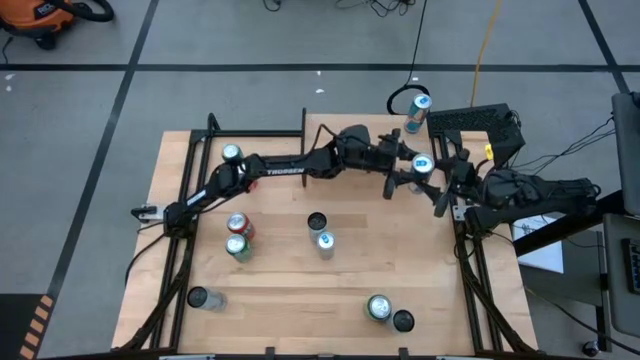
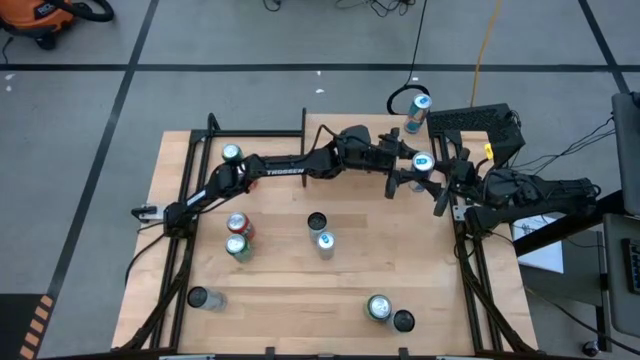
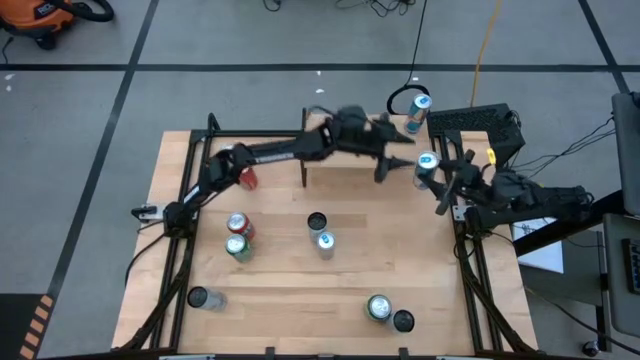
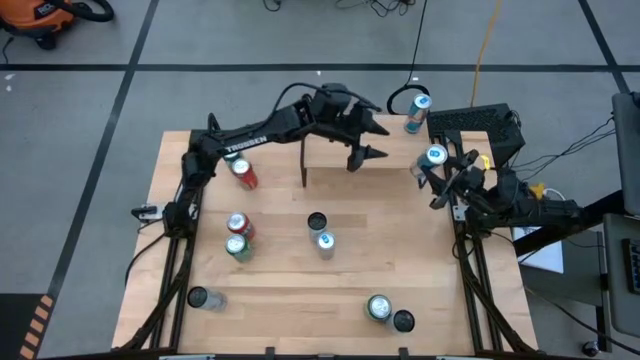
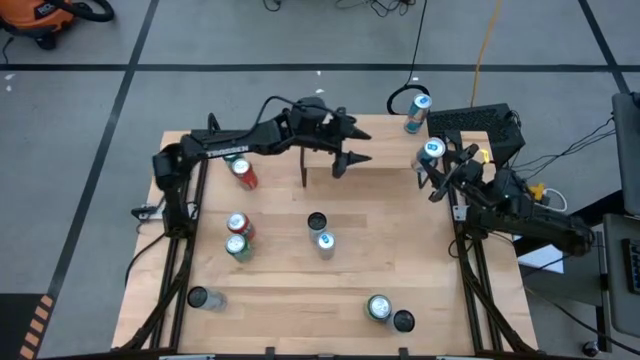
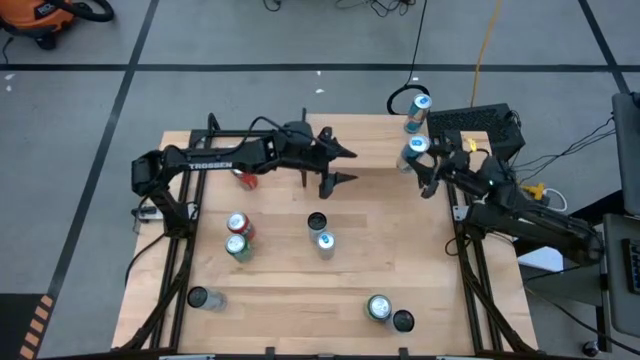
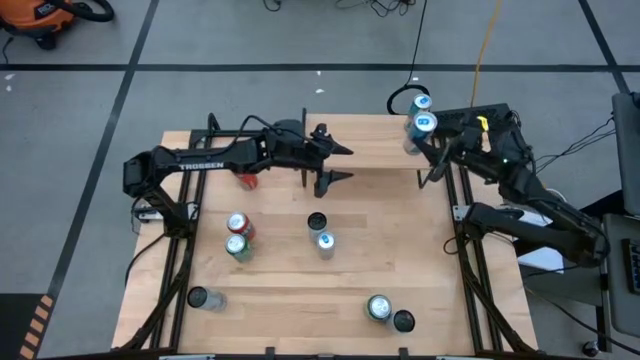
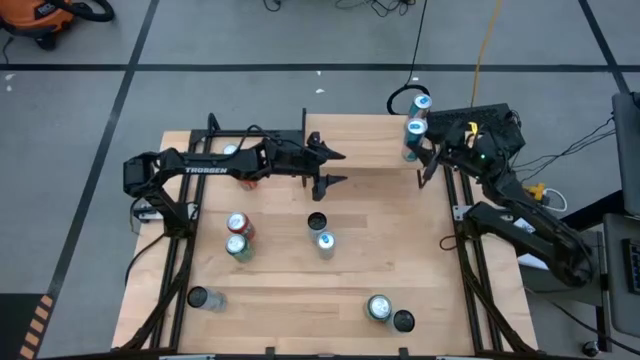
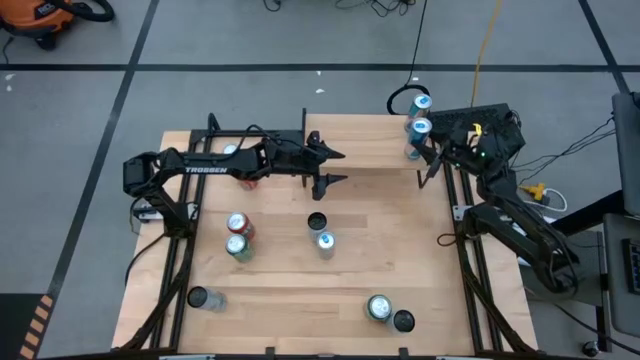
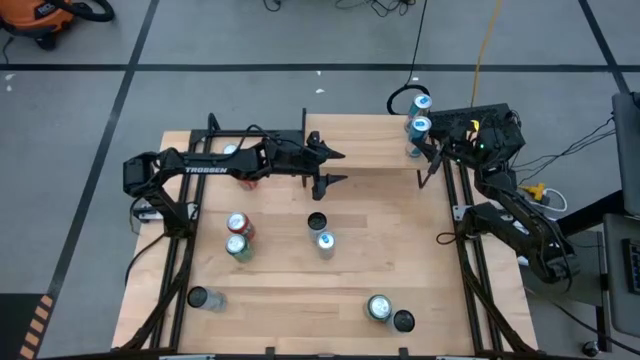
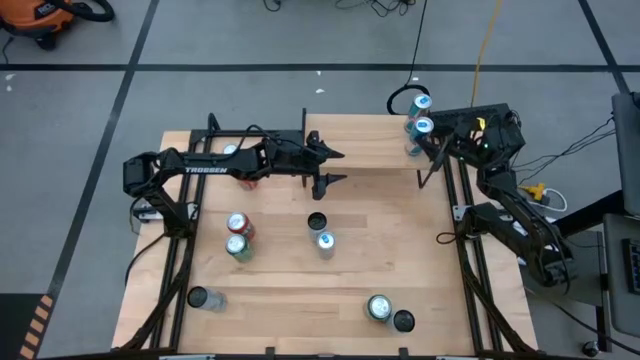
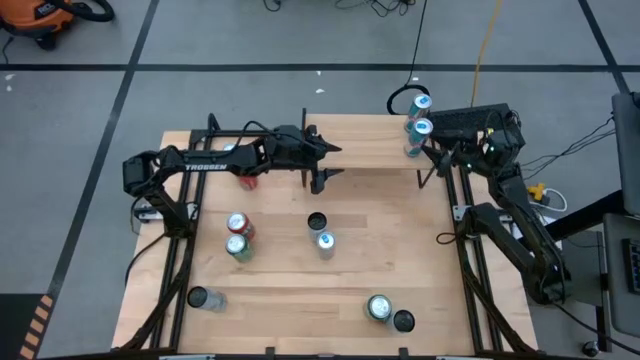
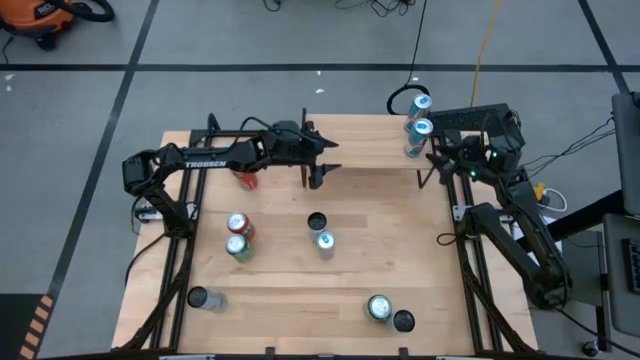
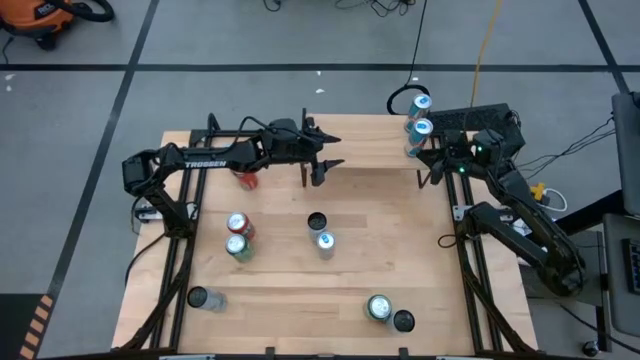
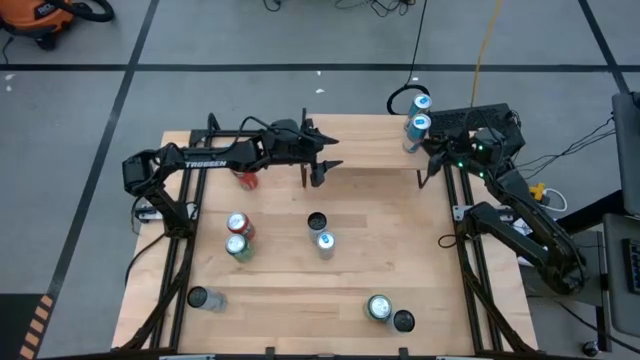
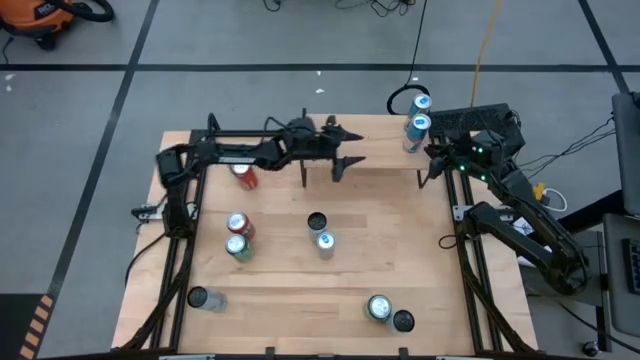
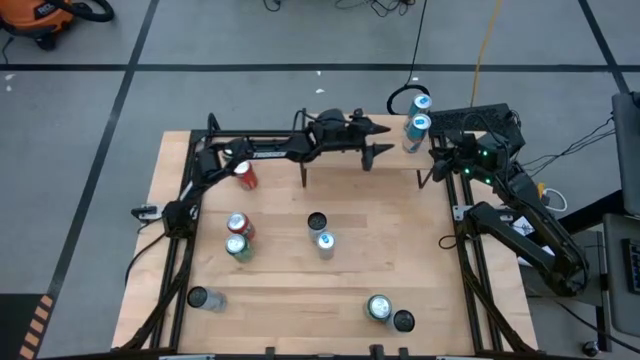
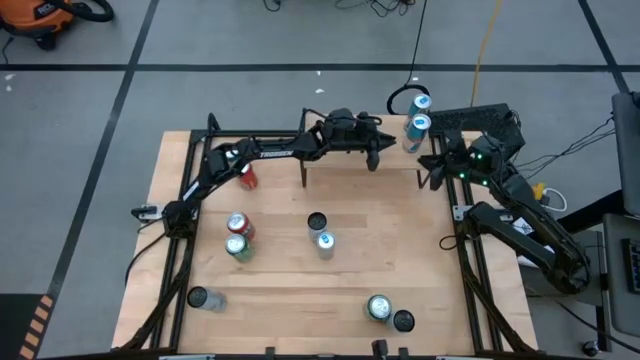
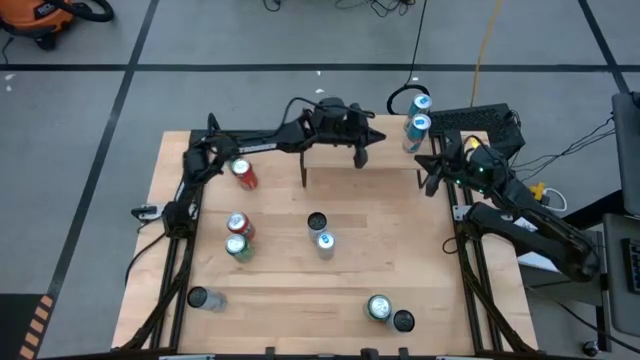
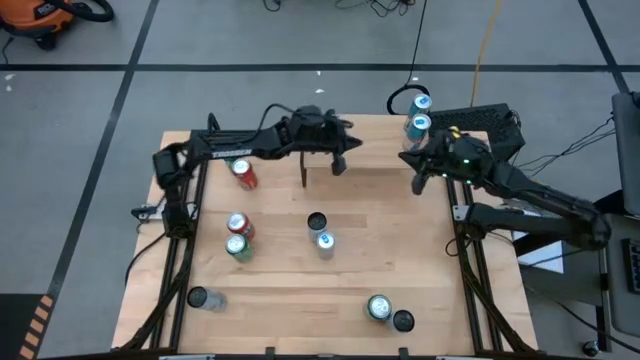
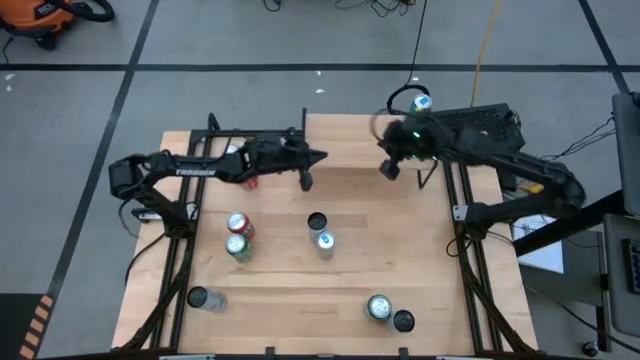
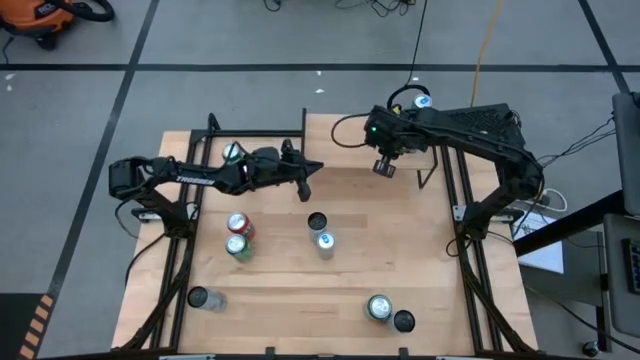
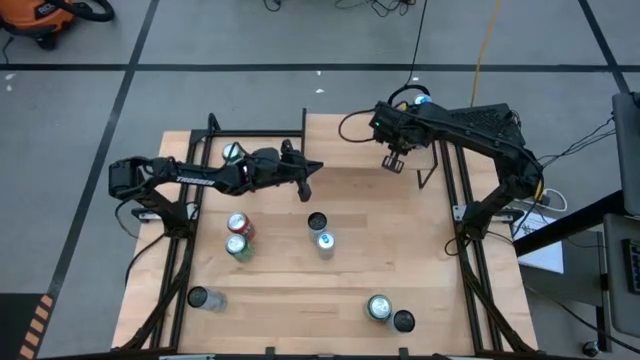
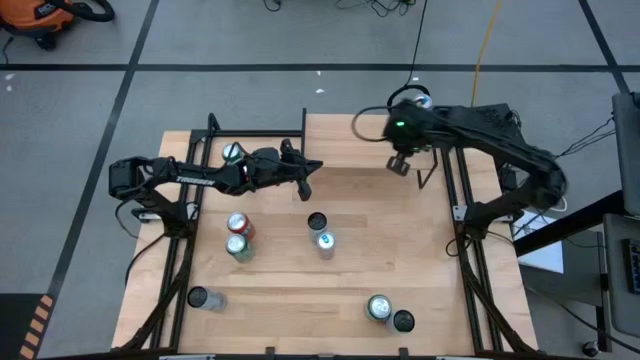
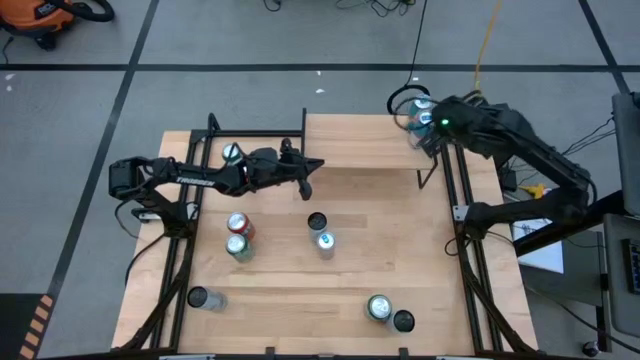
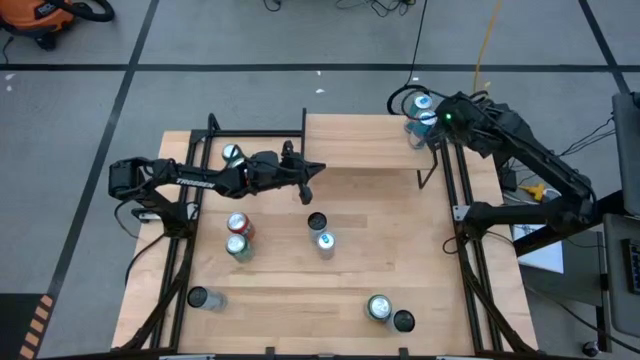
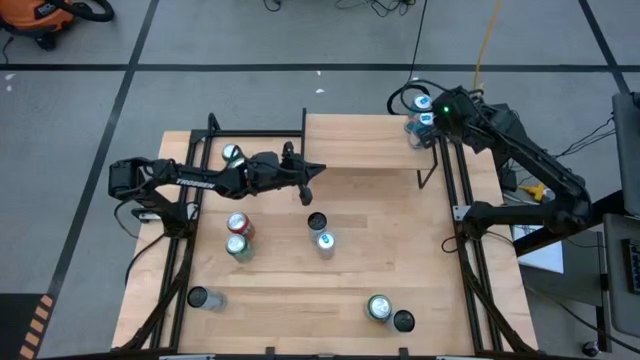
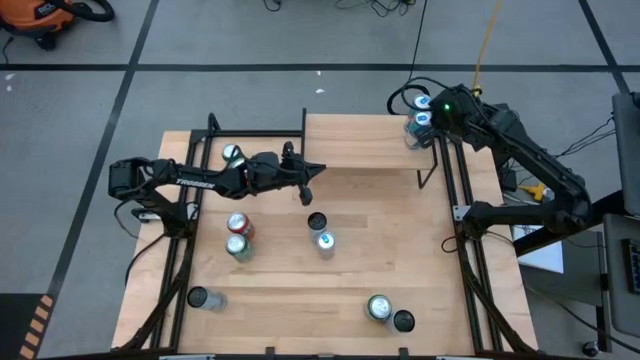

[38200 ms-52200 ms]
Task: Place canned beverage on shelf
Put the bottom blue soda can on the shelf aligned with the other blue soda can

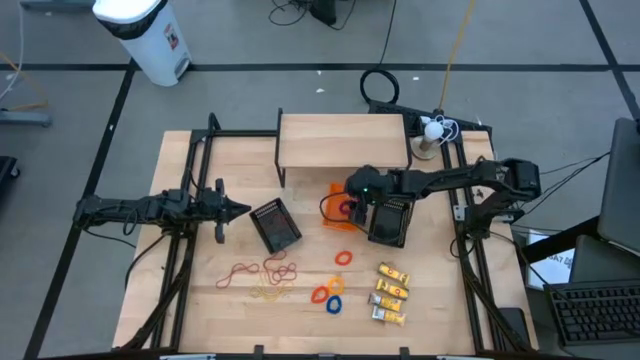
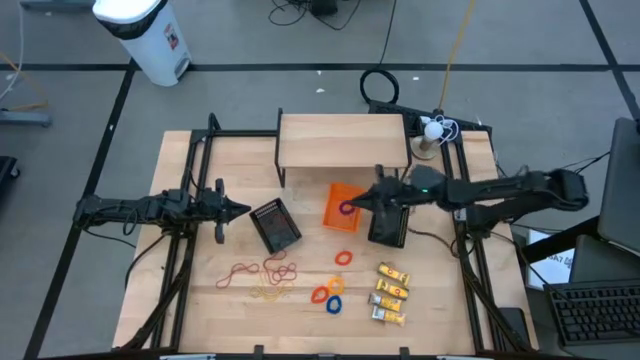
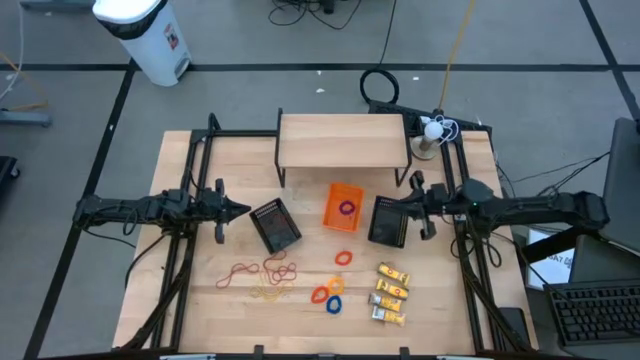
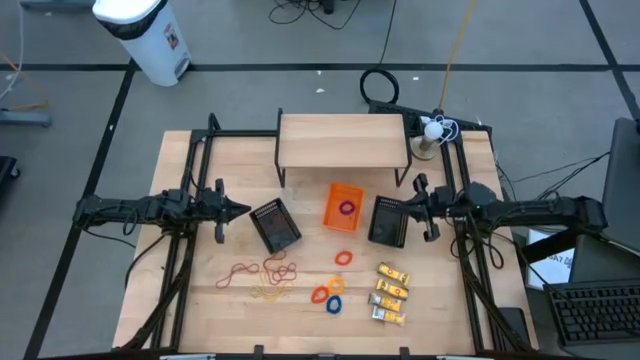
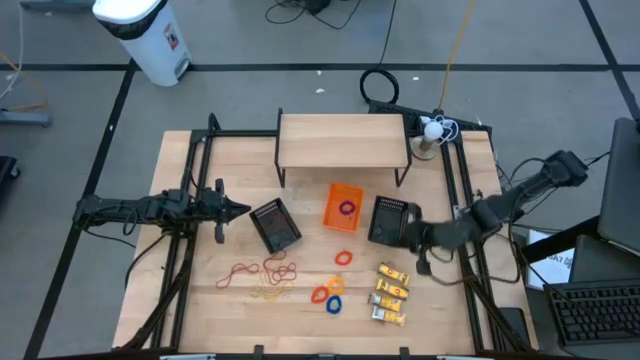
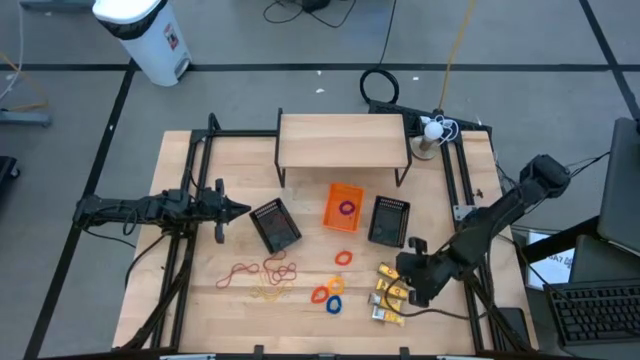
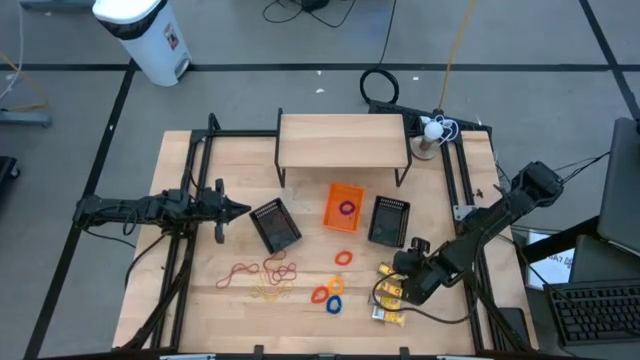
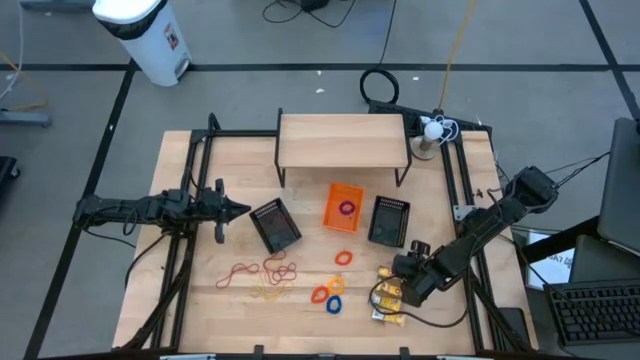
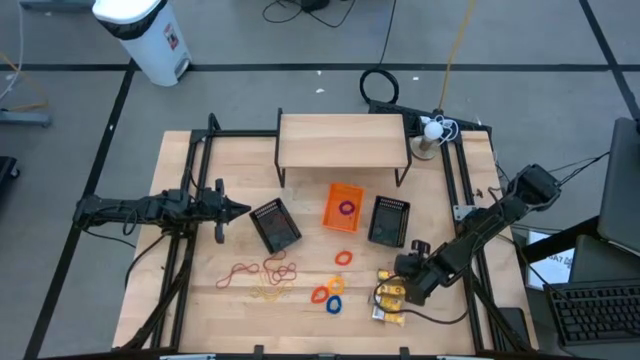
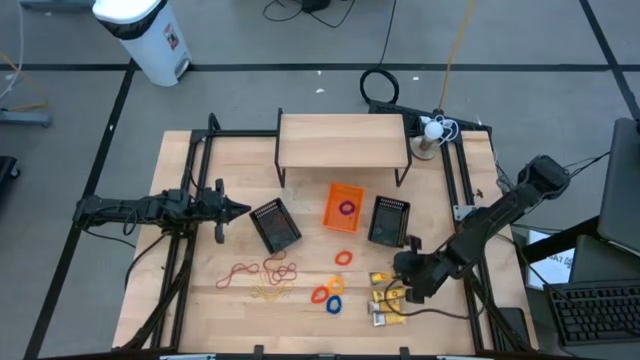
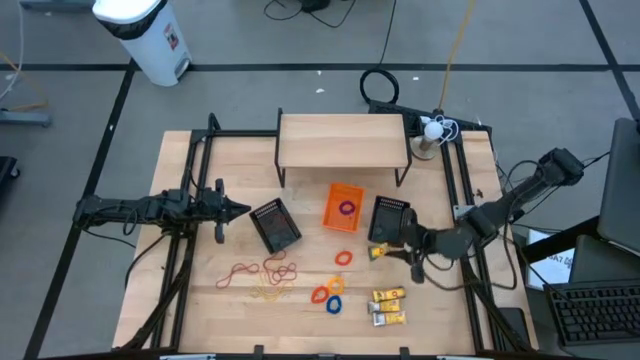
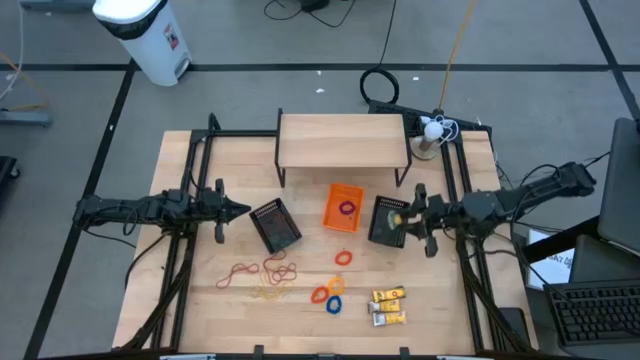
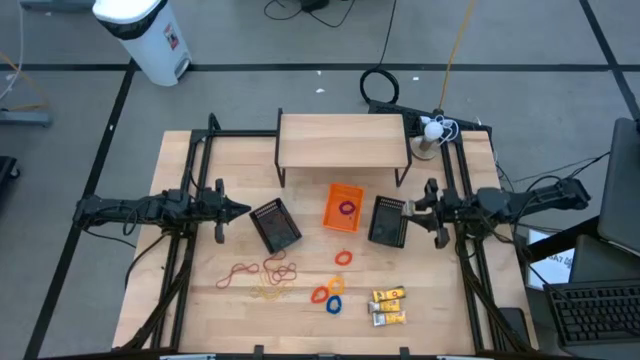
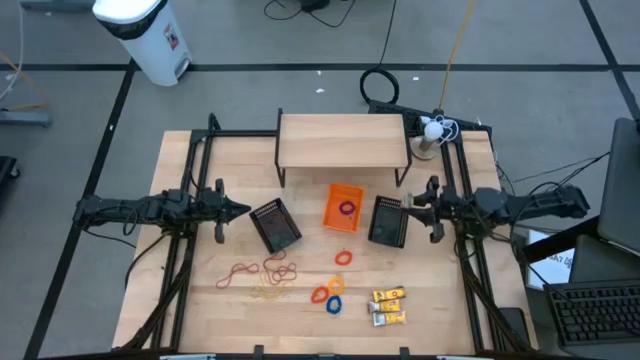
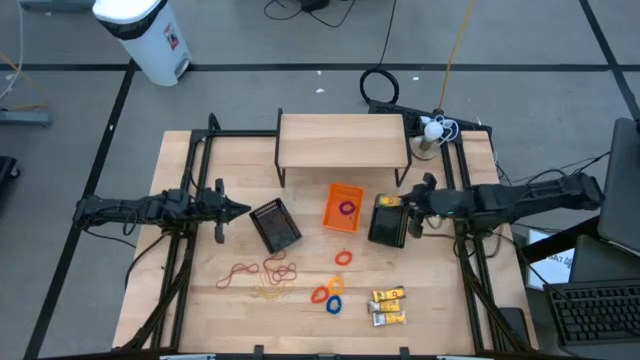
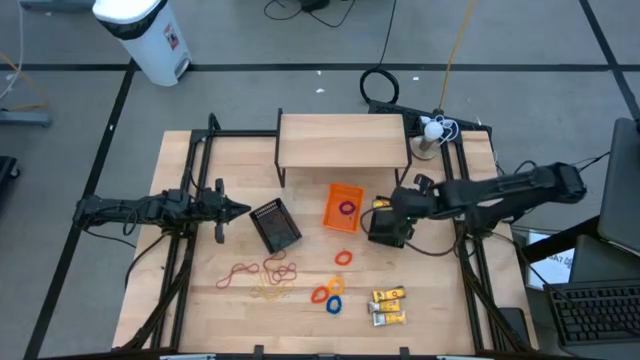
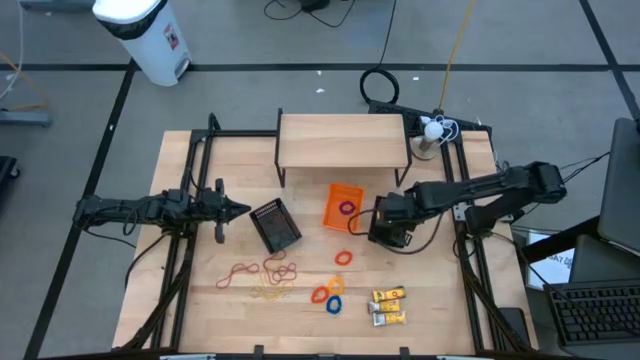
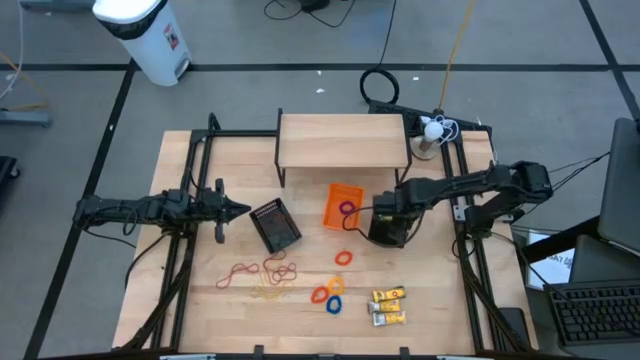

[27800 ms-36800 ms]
Task: Pick & Place Office Desk Supplies
Put the crayon box into the right black bin
